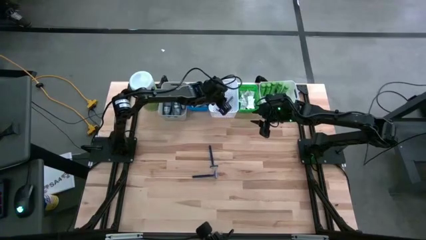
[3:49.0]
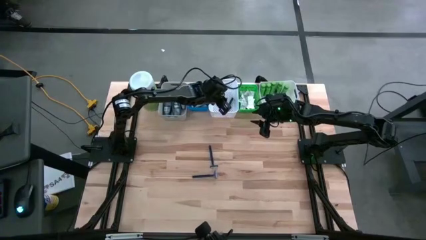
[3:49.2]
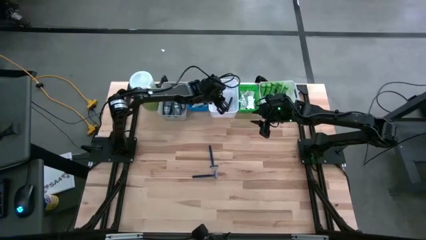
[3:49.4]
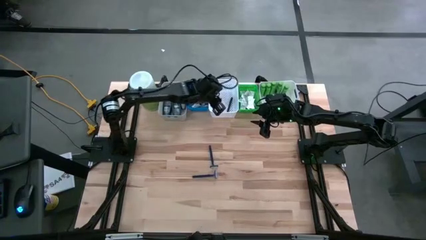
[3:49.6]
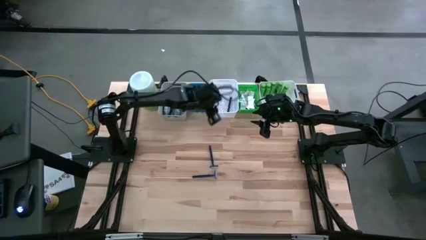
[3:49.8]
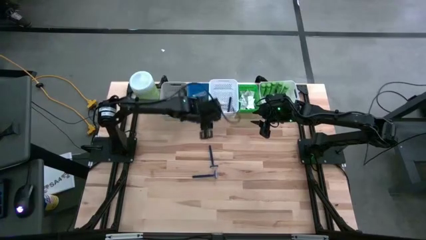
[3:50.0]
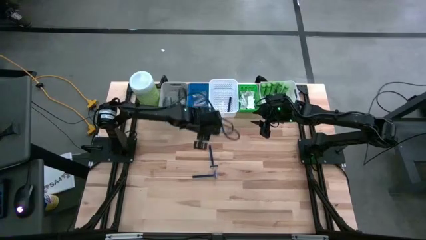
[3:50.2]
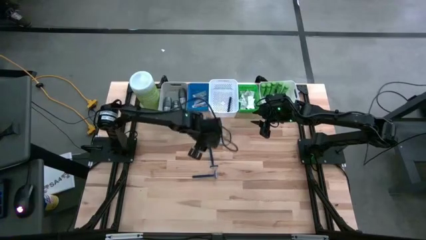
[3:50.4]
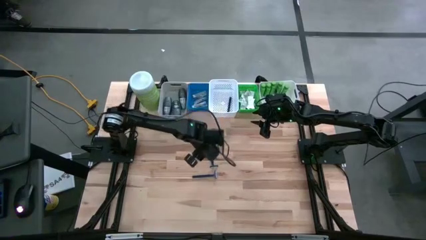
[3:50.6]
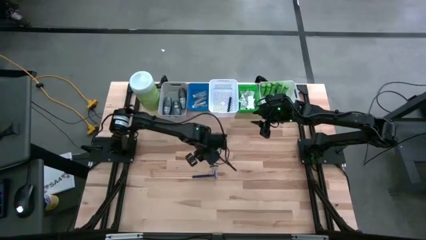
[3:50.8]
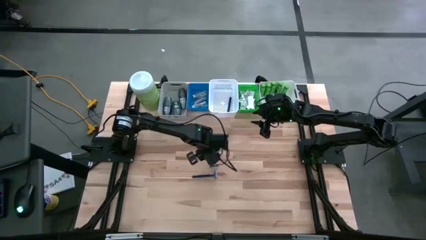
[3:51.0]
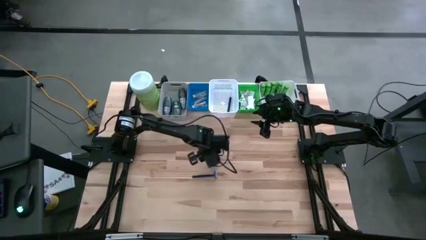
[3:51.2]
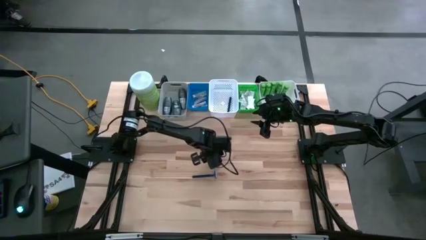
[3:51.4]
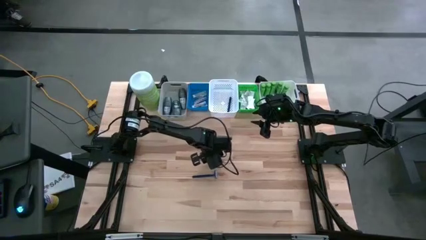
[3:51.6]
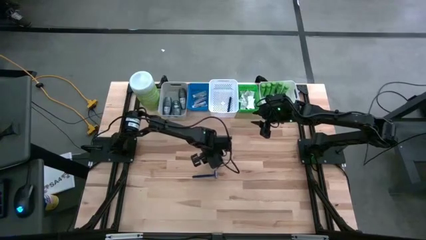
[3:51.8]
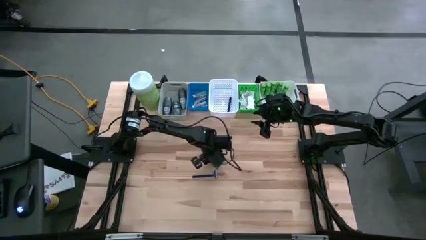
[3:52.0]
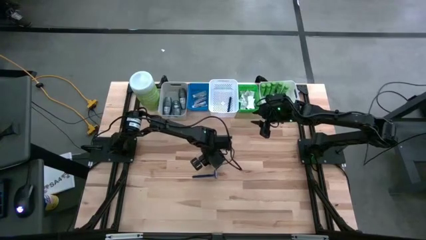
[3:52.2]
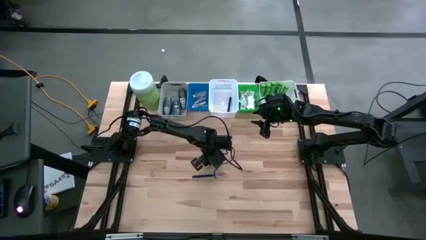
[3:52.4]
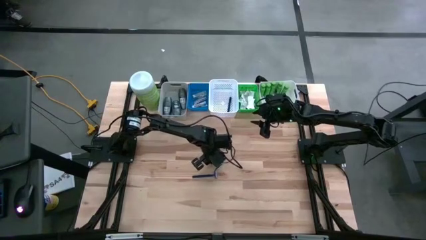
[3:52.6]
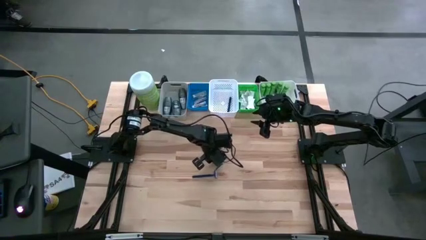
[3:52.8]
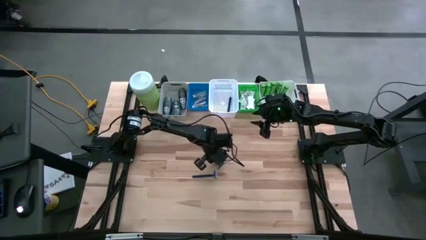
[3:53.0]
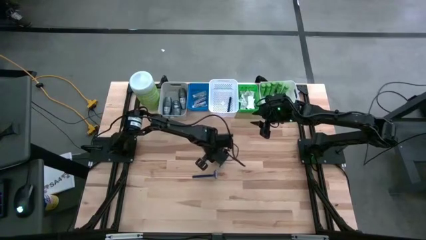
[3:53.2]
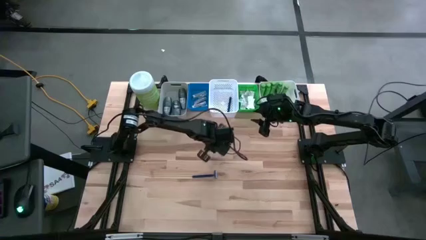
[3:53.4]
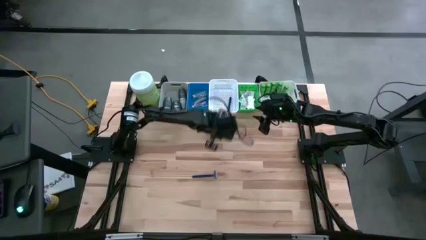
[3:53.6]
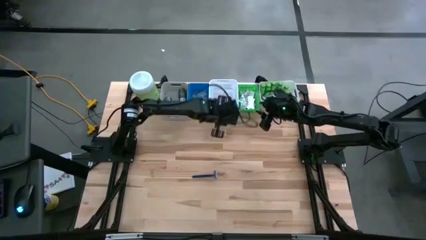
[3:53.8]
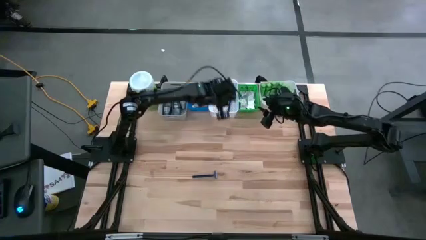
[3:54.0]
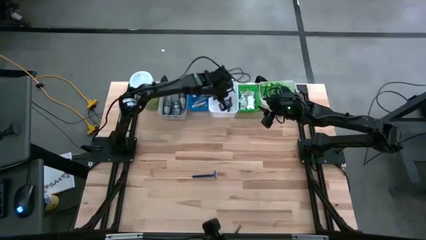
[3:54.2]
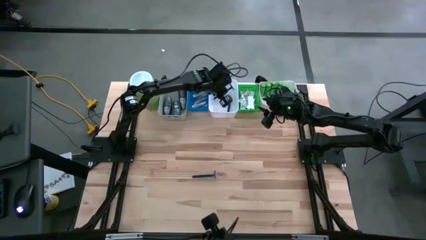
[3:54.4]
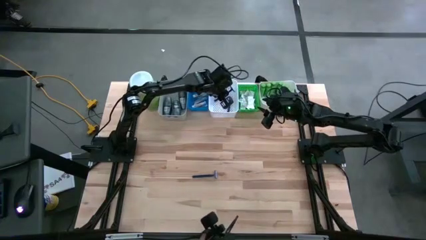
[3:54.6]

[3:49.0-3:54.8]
Task: Pick & Place Travel size toiletries
Put the top blue razor into the left white bin

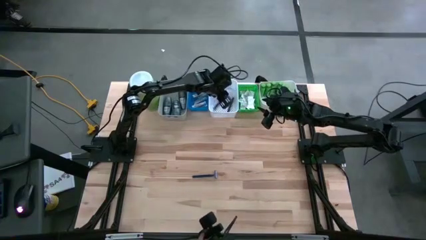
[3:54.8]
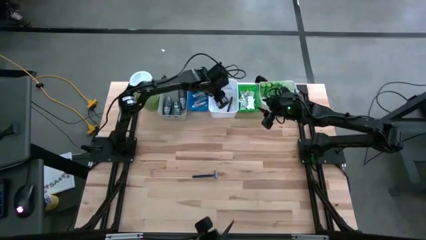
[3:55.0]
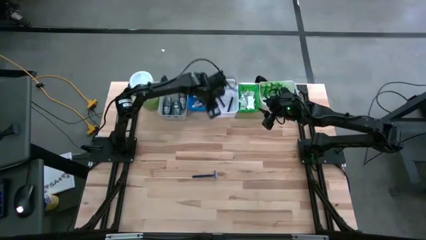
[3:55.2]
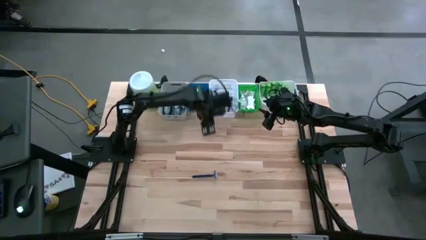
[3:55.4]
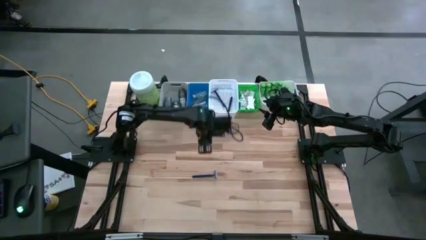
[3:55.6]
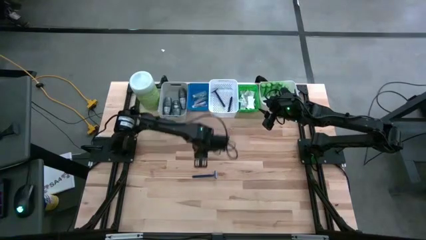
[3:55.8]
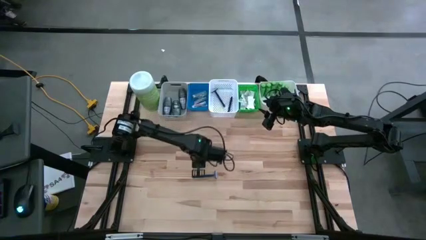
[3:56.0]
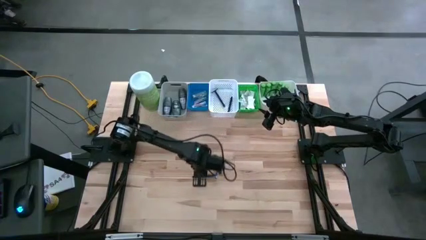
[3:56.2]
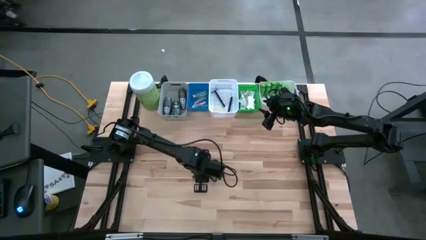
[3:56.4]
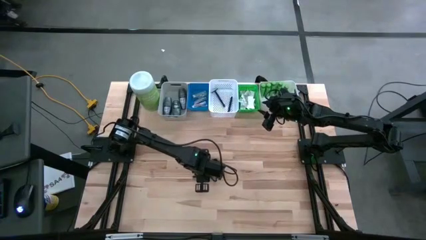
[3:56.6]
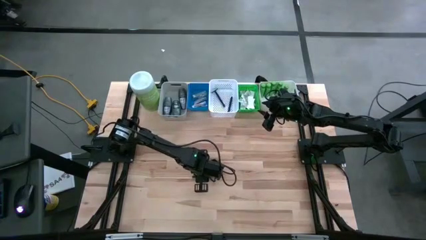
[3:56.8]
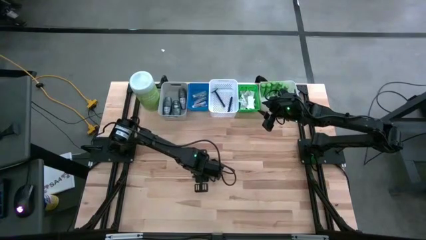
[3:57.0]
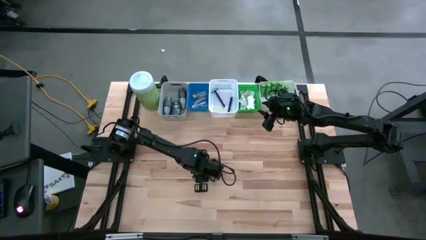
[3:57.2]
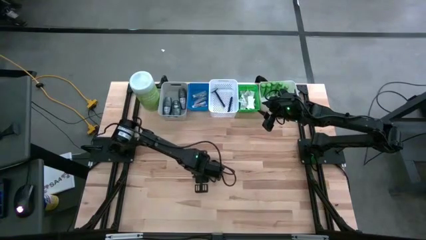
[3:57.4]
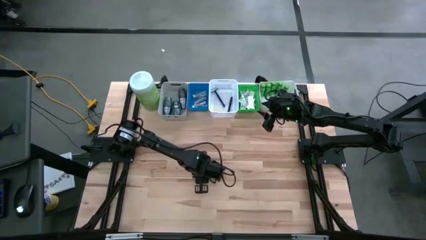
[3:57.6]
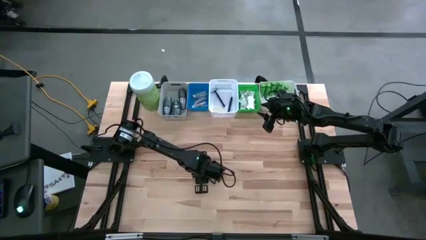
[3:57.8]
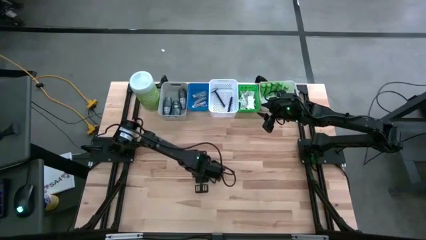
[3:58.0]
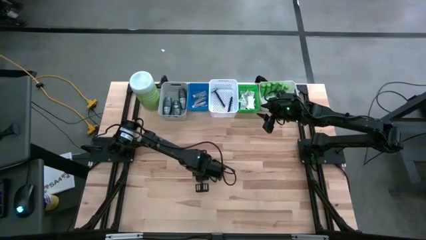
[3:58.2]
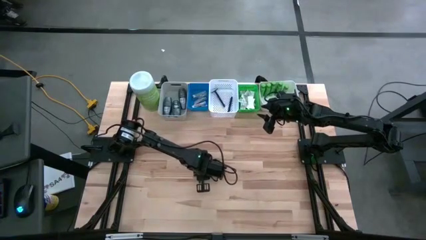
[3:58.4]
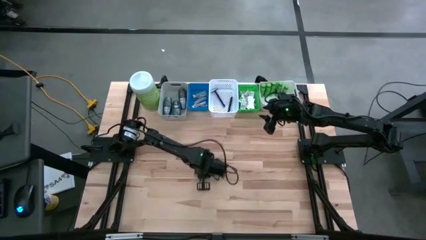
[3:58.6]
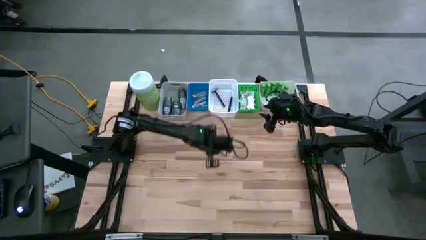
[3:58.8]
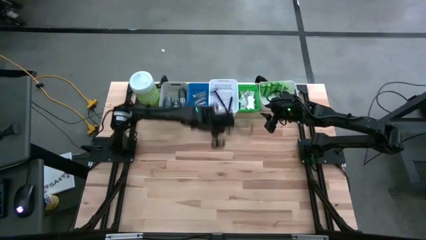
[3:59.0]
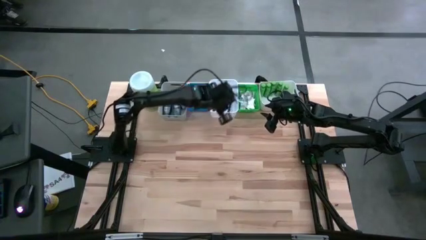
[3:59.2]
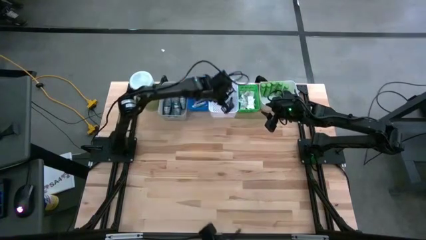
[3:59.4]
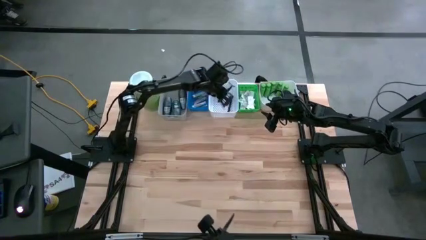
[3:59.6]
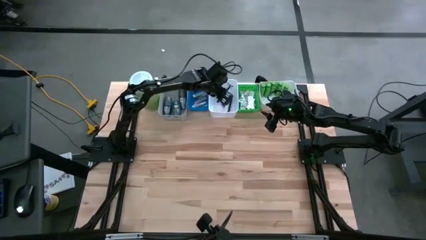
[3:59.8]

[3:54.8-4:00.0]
Put the blue razor into the left white bin

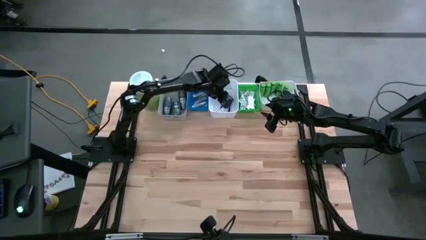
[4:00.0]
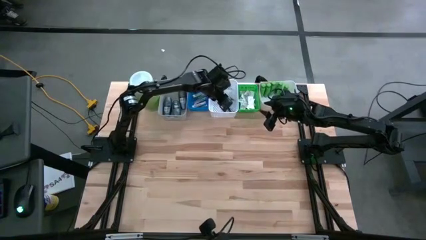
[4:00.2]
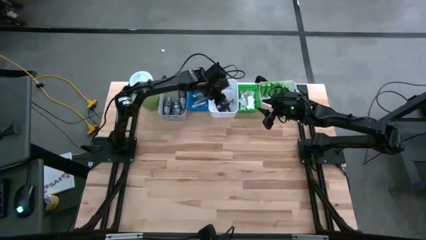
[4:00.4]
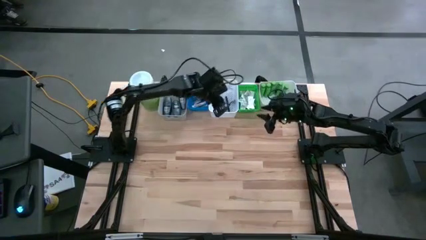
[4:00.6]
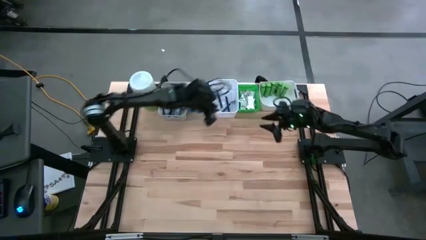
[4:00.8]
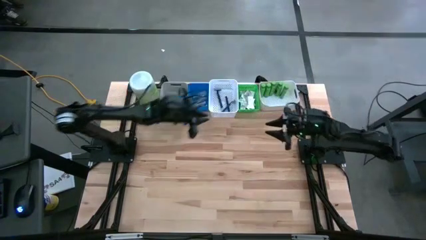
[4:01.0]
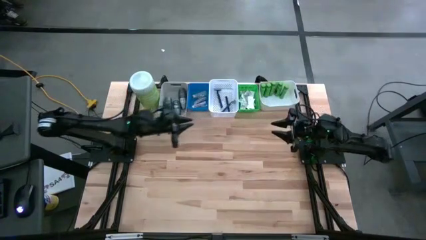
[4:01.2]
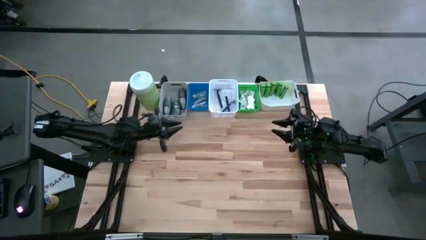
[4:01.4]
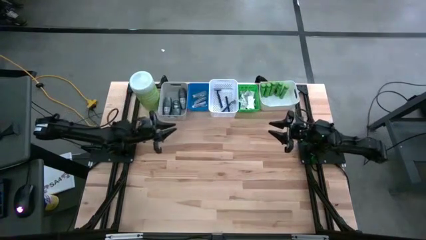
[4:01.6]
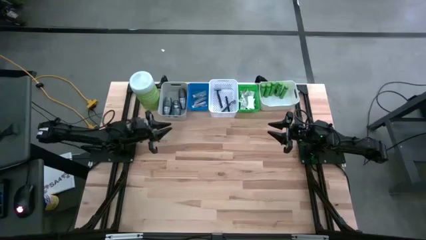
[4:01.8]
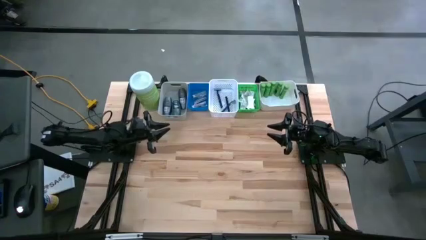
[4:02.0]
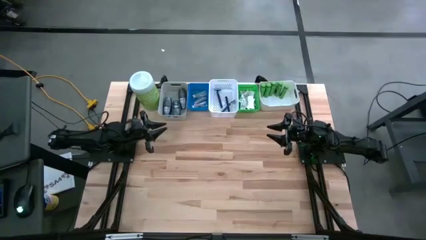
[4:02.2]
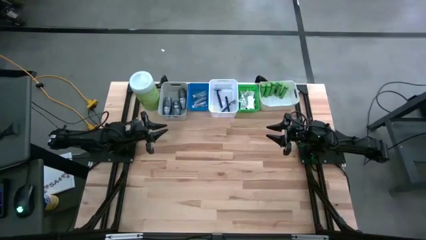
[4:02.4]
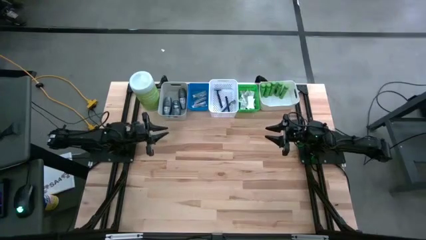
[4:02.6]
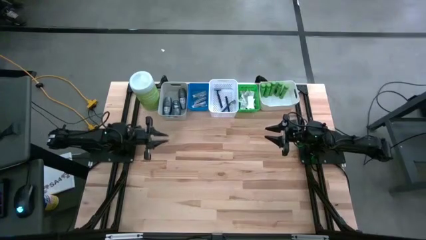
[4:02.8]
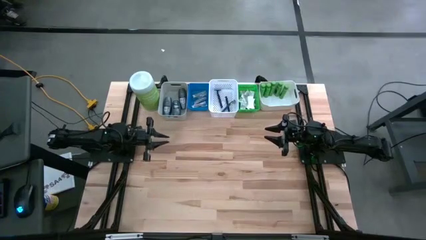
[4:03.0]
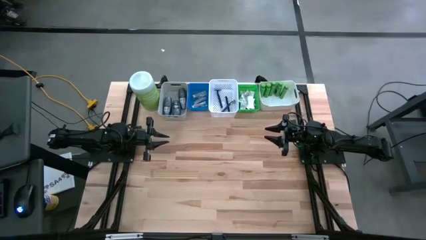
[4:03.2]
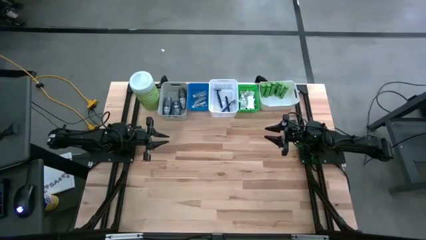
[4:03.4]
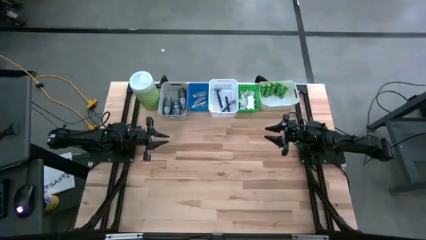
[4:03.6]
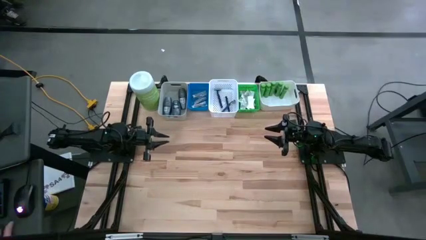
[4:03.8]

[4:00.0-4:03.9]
Return to Home Position

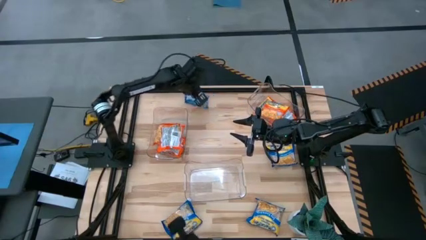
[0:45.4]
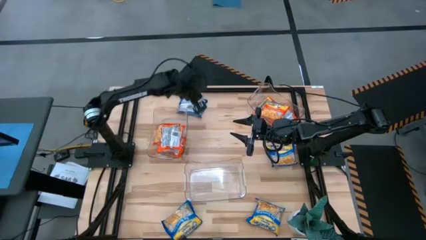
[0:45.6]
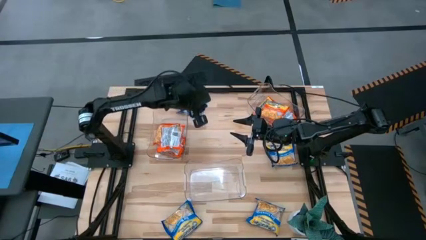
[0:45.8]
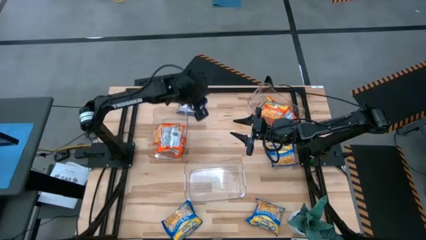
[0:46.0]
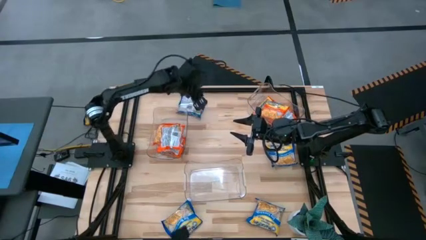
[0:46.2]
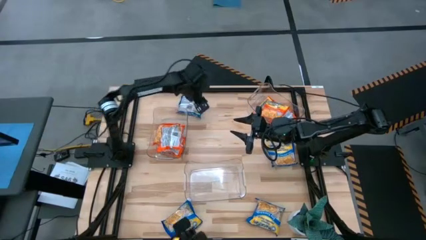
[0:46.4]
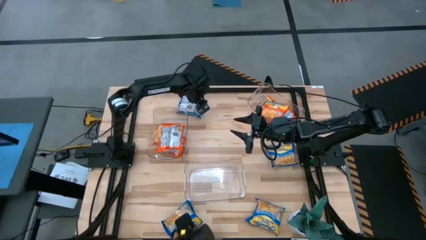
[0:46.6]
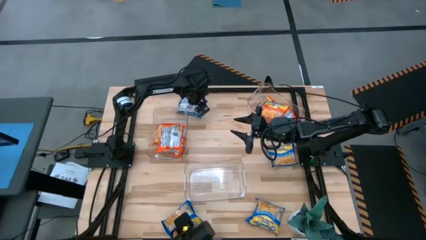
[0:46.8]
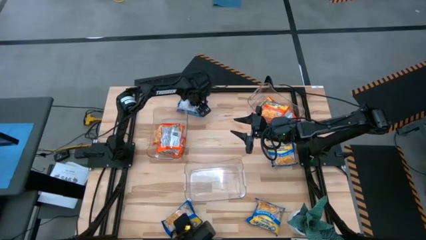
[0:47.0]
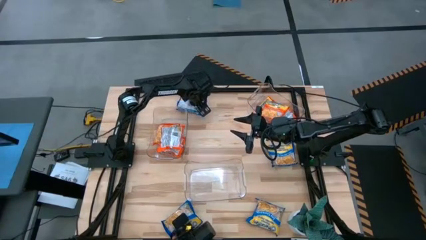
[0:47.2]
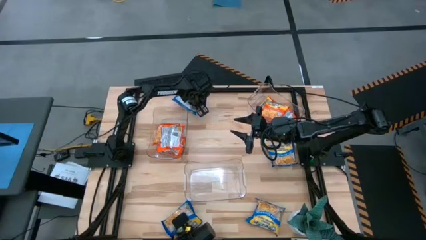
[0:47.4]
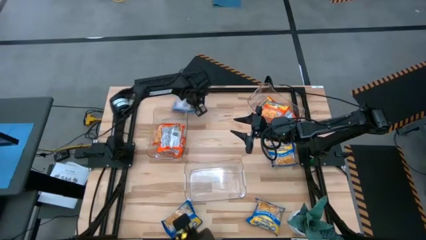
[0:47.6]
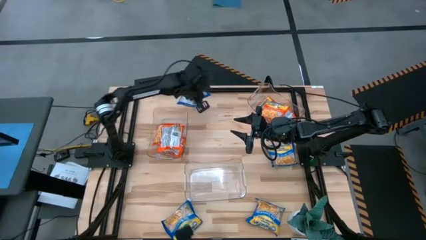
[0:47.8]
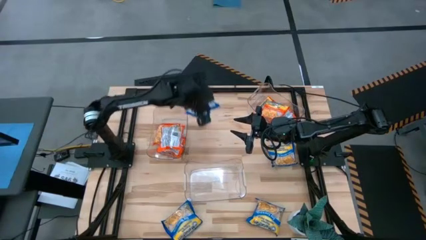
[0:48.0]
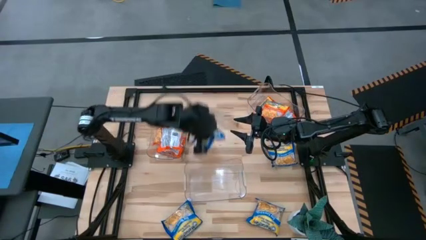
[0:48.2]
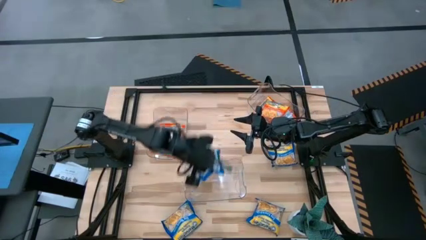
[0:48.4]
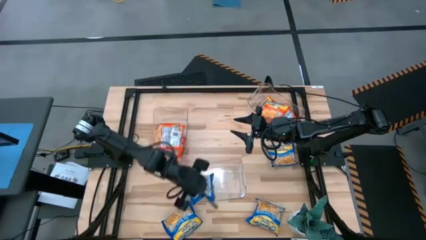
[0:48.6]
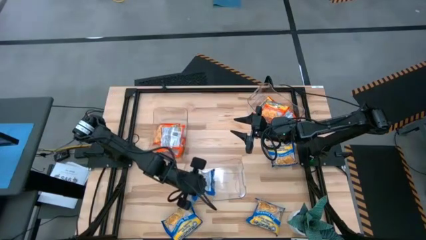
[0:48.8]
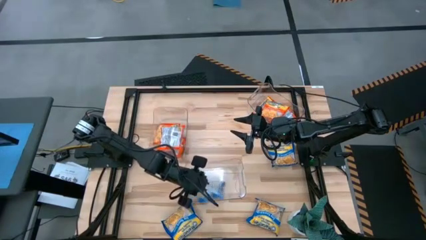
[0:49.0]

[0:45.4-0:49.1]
Task: Sort Maruchan noodles
Put the blue noodle pack into the bottom transparent bin
